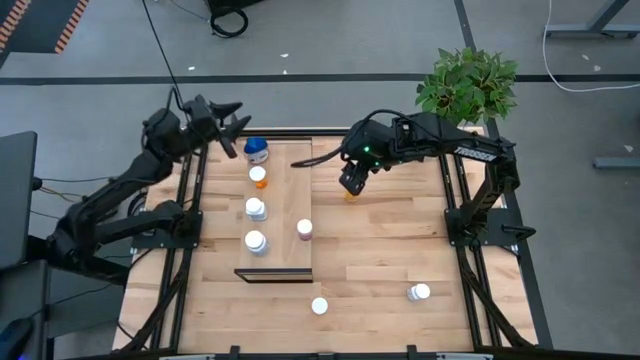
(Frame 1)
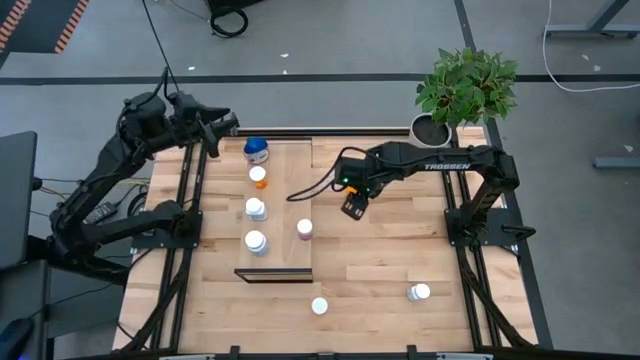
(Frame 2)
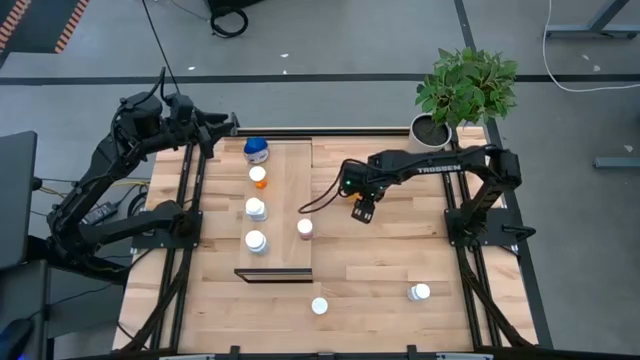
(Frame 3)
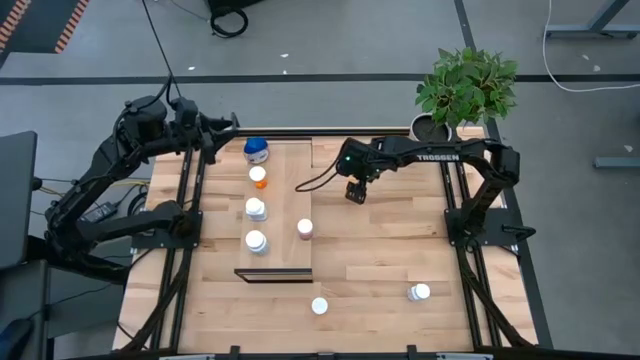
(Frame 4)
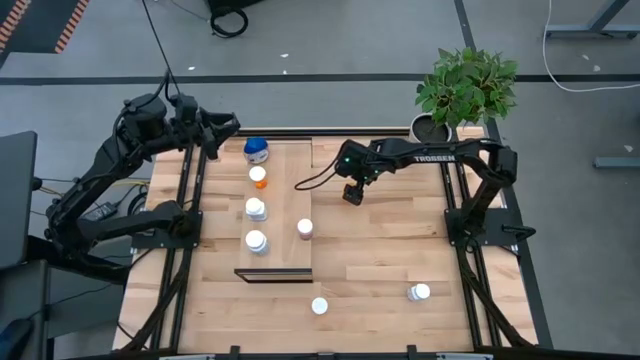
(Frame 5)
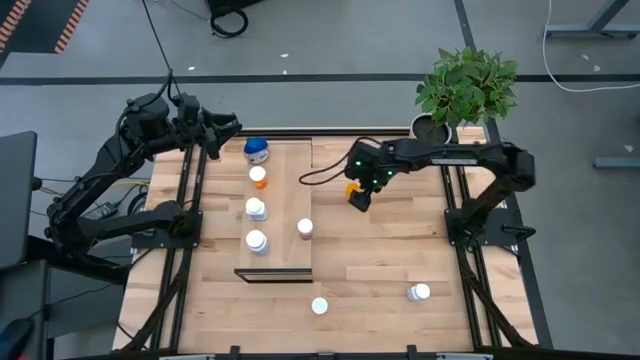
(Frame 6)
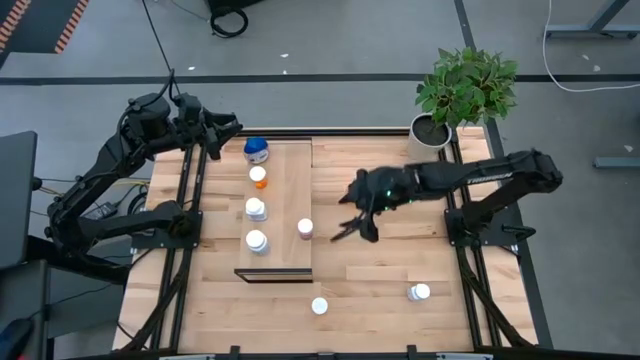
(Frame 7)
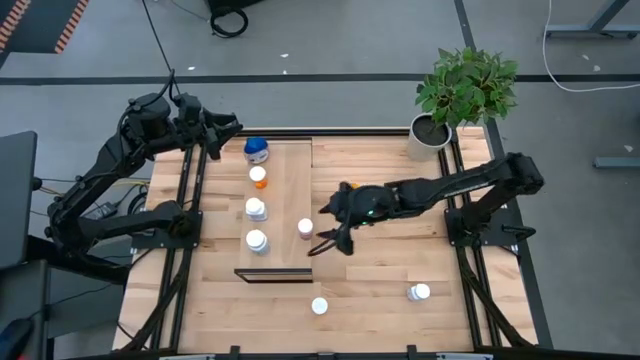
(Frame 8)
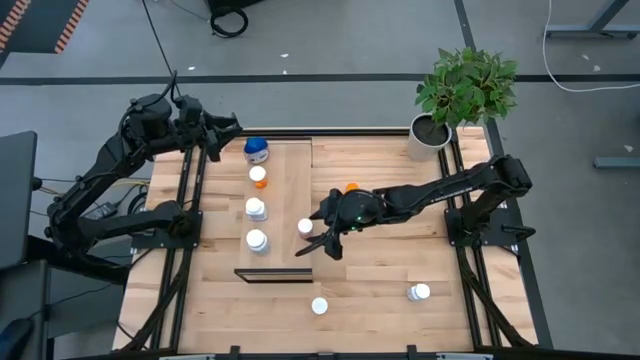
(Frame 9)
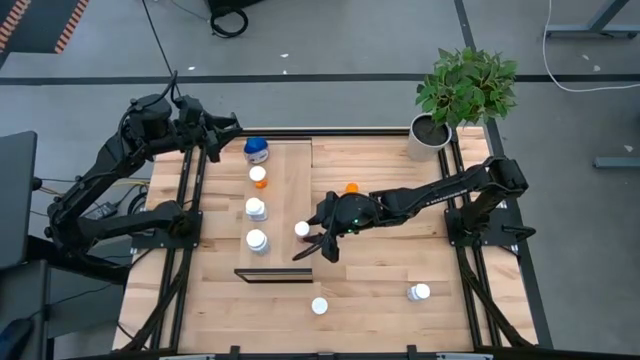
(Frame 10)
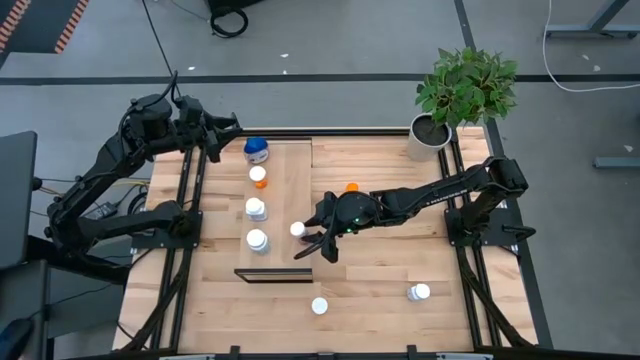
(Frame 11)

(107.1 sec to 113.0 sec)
Task: Pick and place medicine bottles onto shelf by color
Adjust the pink pill bottle on the shelf

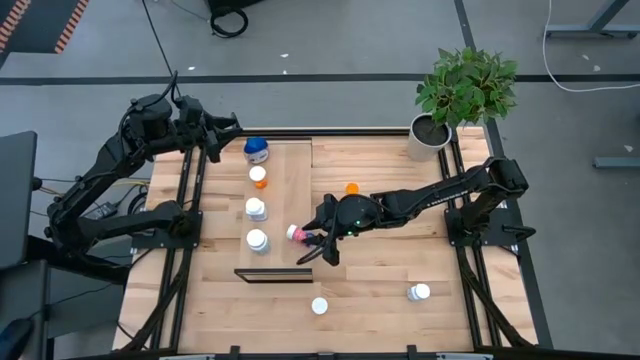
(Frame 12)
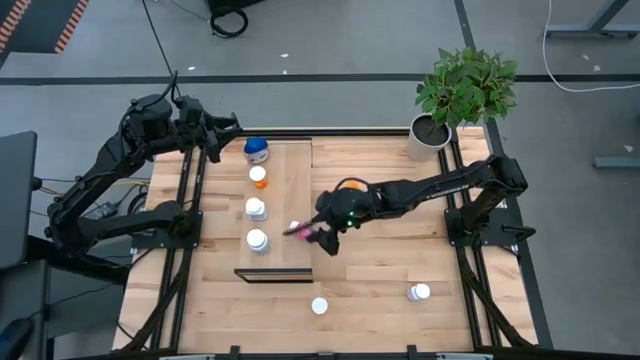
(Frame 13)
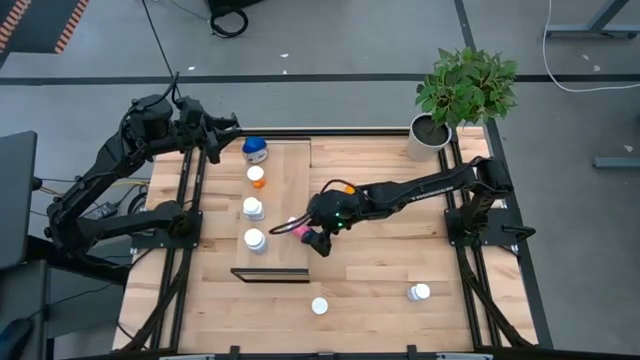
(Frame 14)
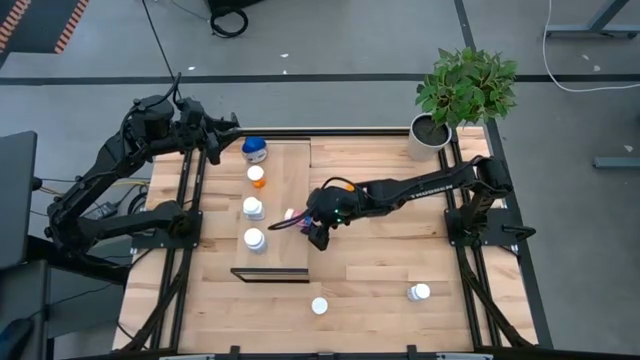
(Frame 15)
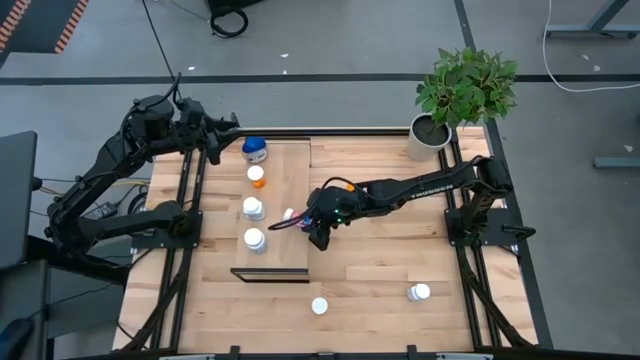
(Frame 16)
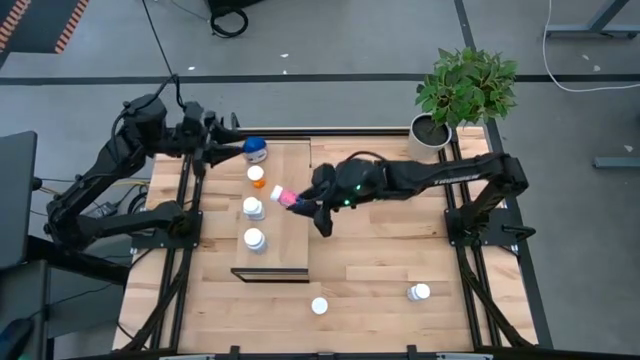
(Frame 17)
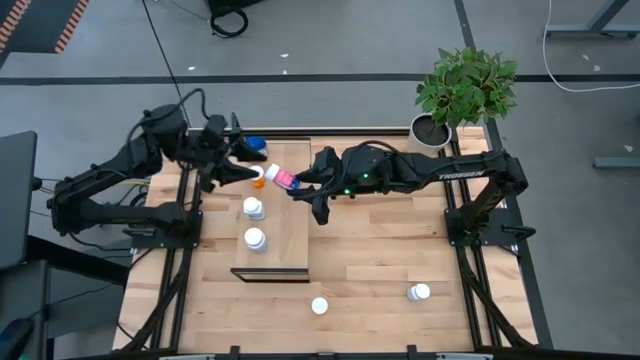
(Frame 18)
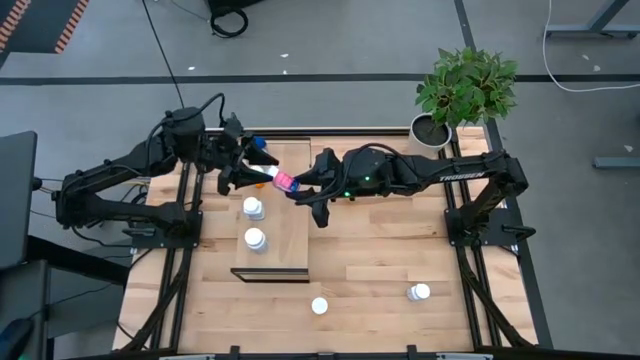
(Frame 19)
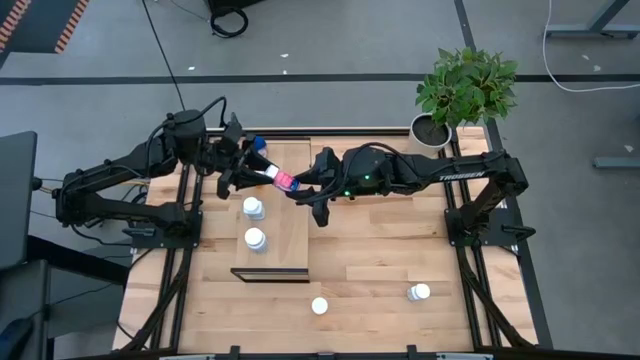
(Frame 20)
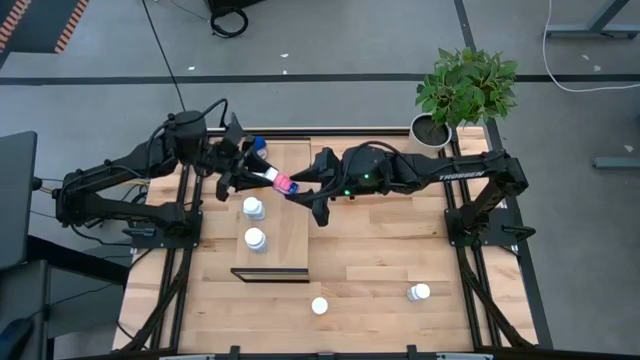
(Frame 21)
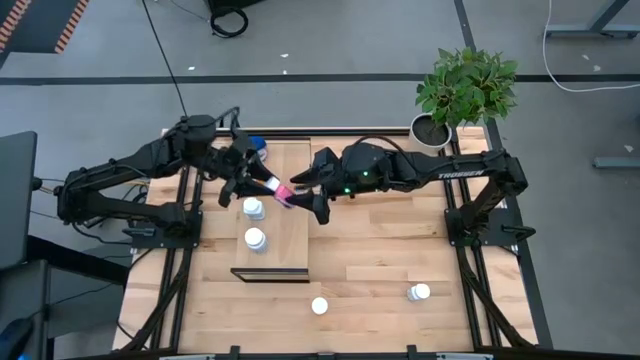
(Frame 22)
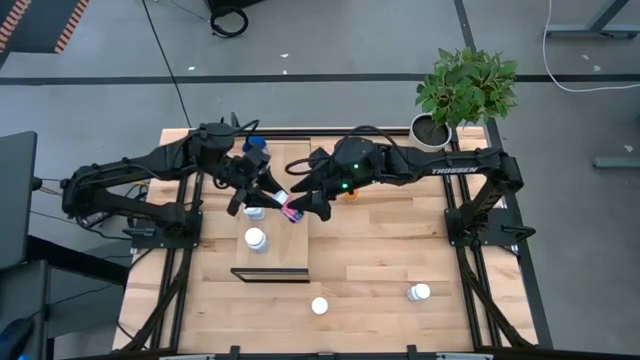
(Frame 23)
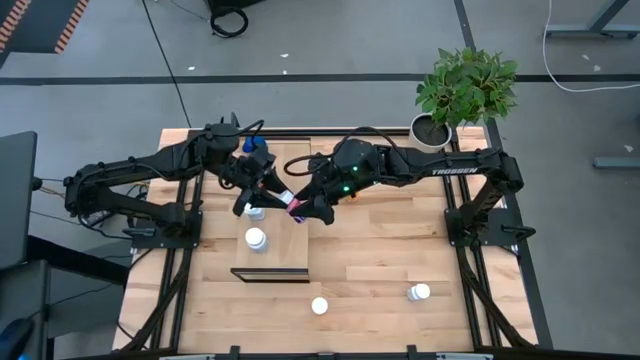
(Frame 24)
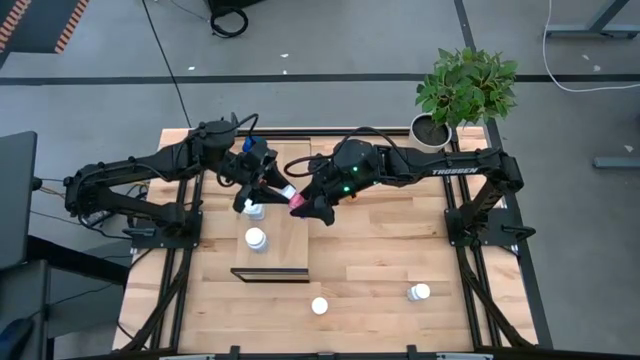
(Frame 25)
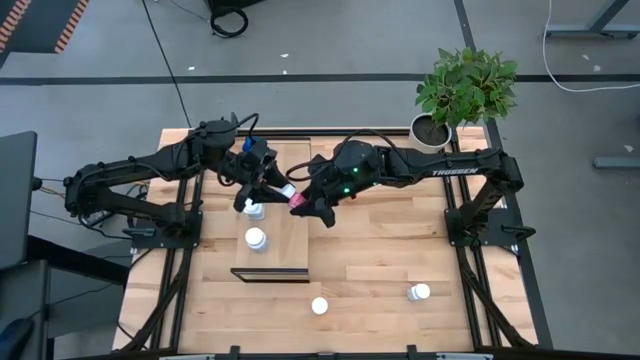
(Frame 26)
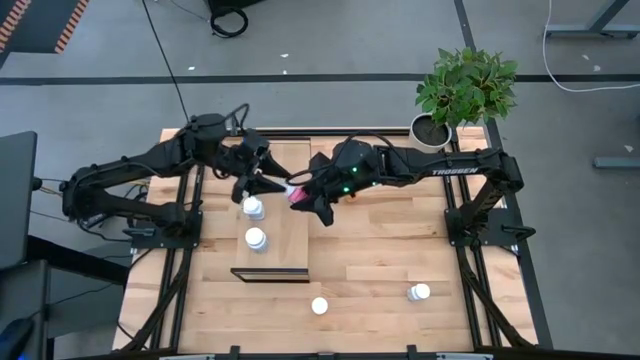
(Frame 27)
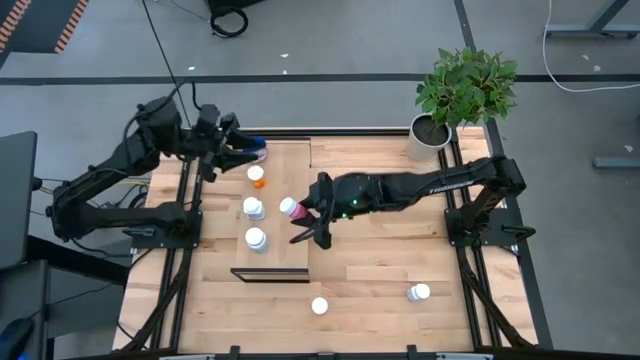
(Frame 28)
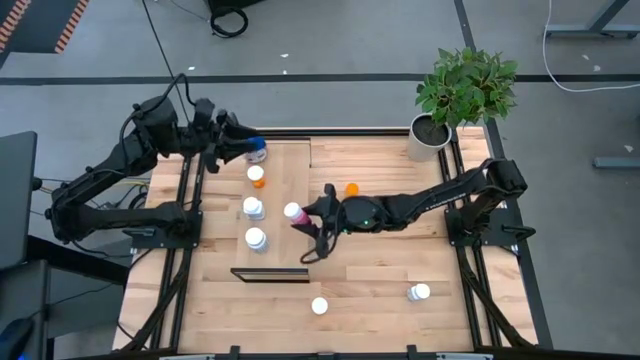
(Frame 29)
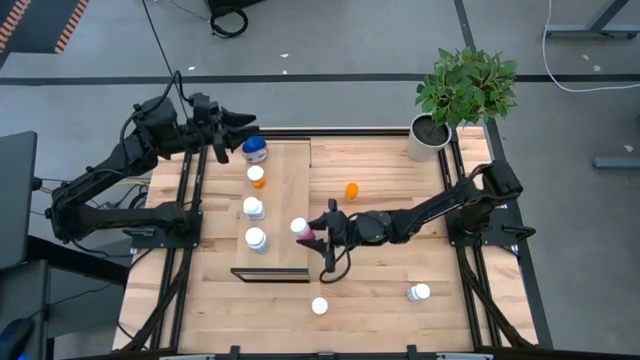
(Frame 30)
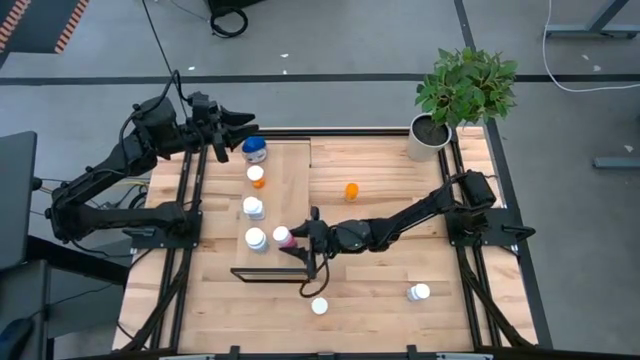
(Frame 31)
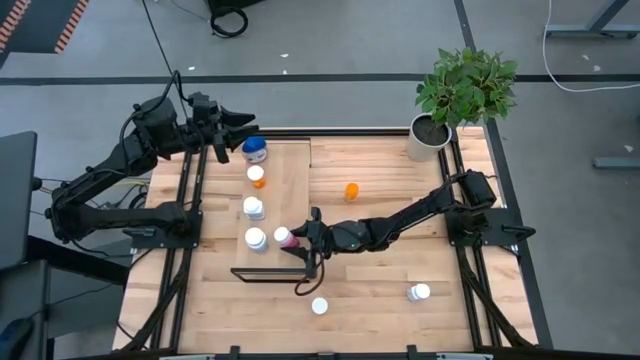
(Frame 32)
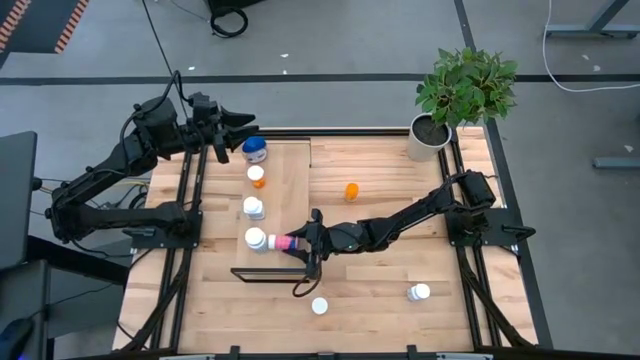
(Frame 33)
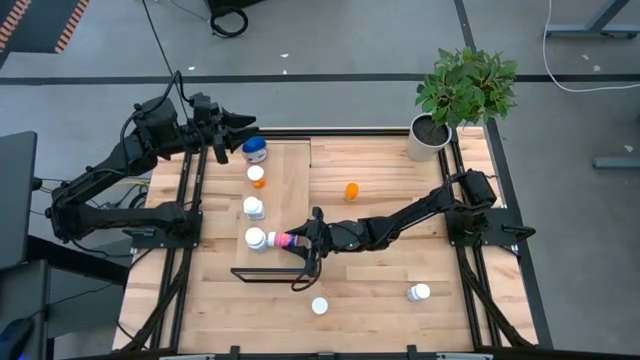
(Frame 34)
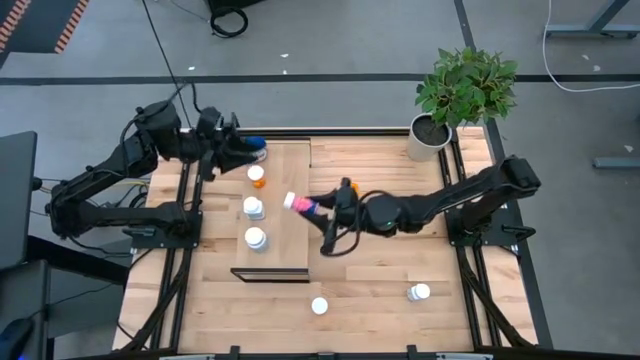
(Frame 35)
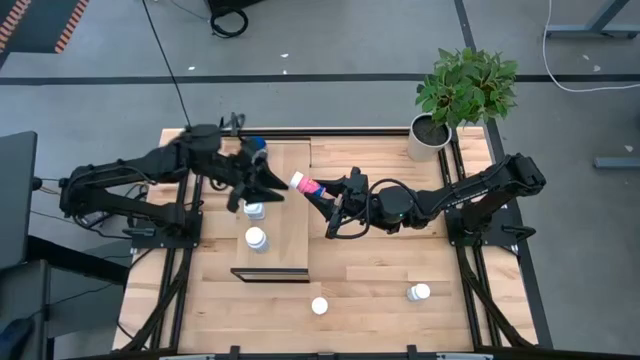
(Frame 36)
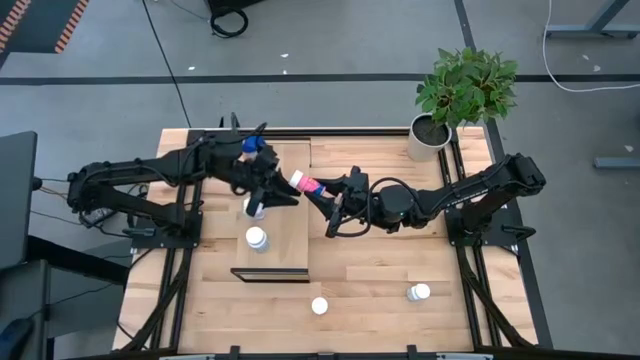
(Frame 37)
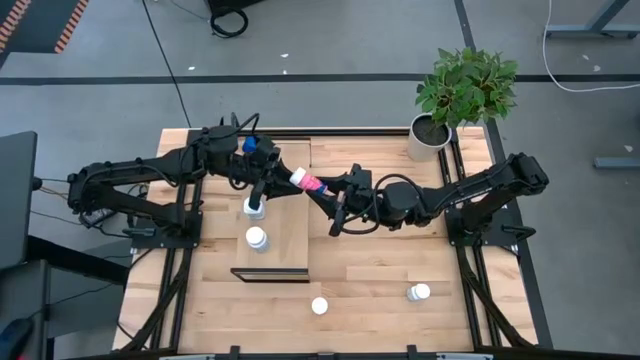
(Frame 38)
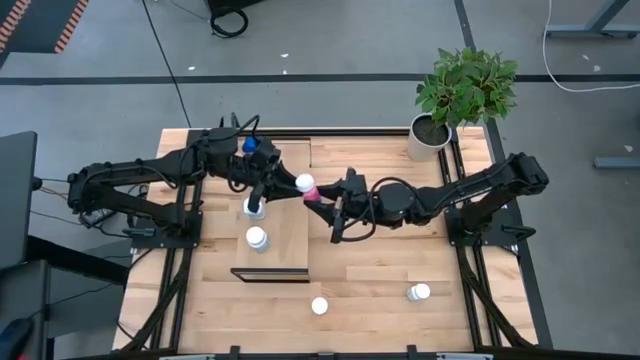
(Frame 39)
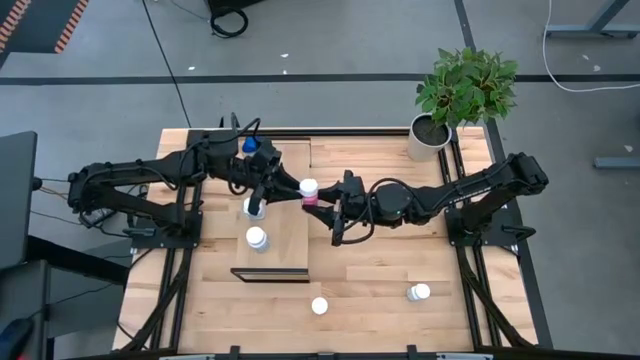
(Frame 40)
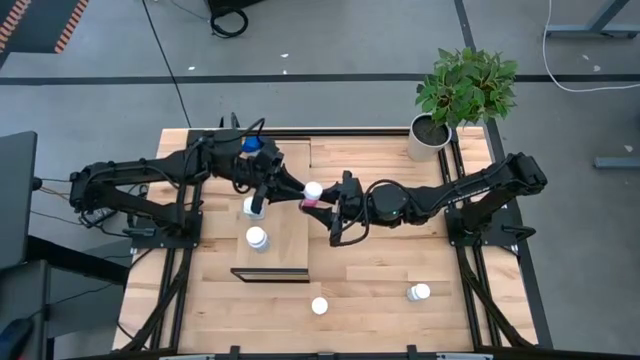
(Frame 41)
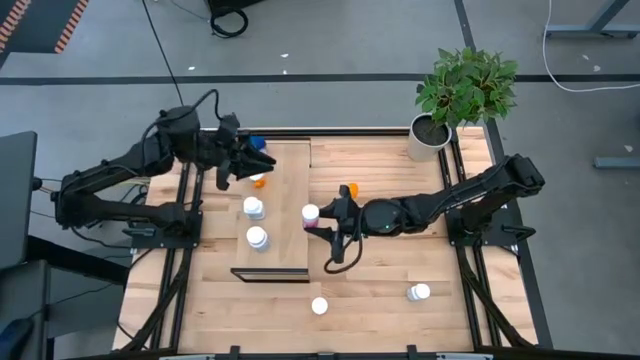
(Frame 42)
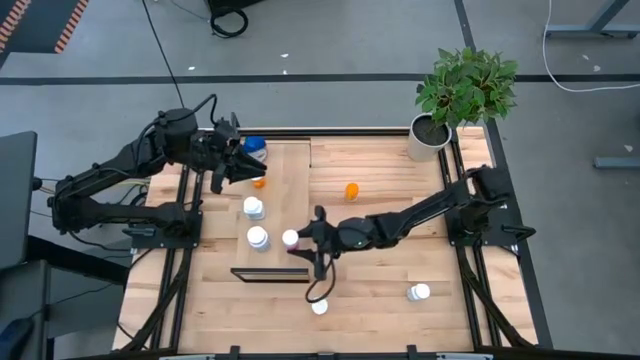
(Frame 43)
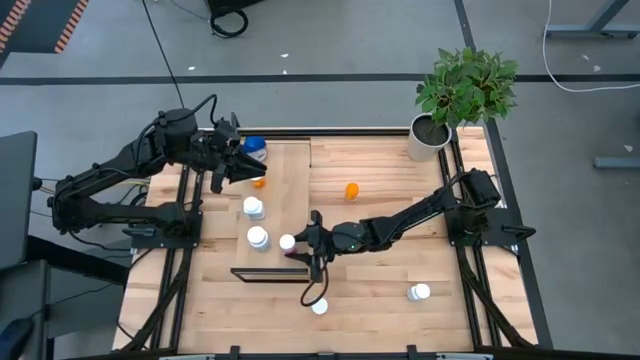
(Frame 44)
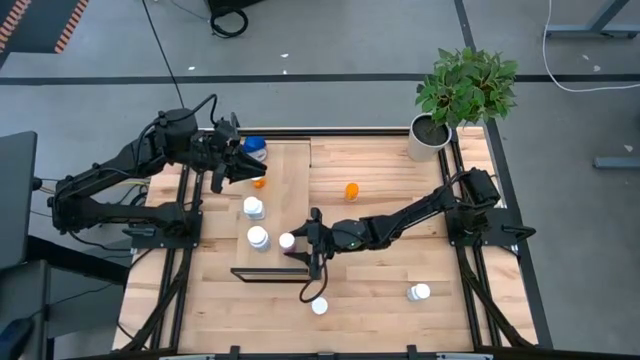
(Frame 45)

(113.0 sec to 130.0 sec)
Adjust the pink pill bottle on the shelf
